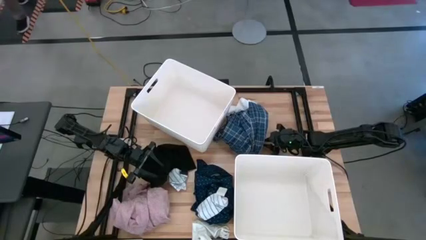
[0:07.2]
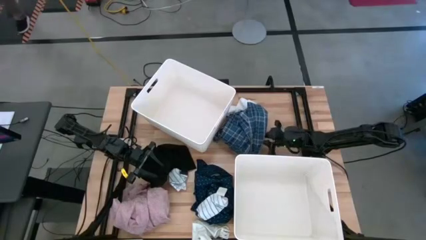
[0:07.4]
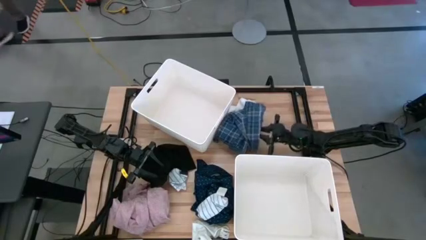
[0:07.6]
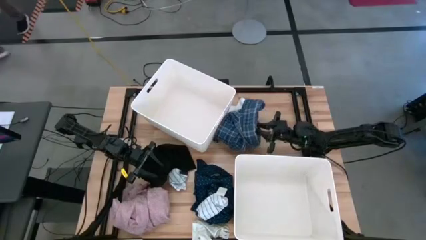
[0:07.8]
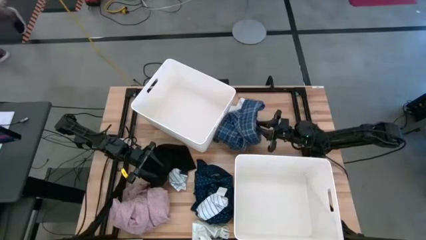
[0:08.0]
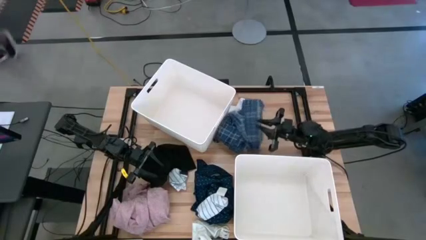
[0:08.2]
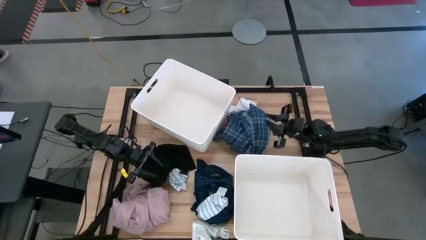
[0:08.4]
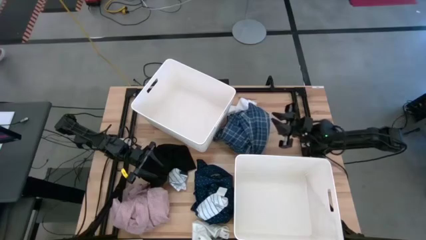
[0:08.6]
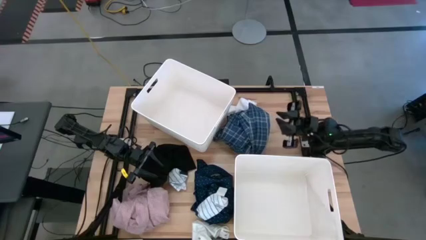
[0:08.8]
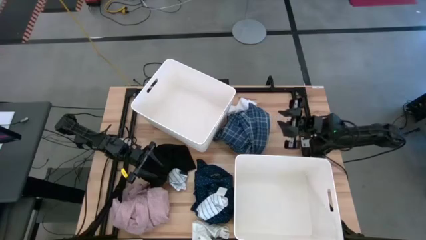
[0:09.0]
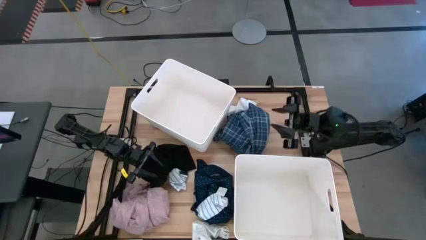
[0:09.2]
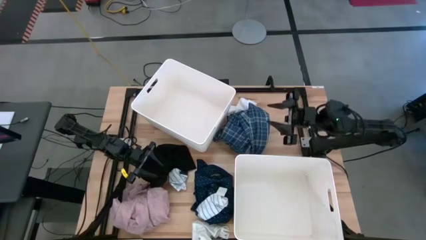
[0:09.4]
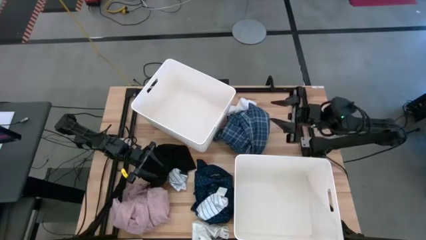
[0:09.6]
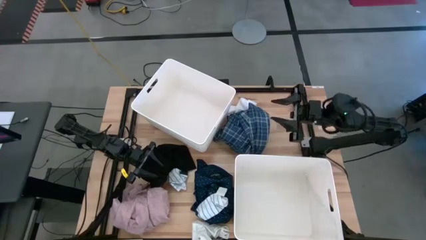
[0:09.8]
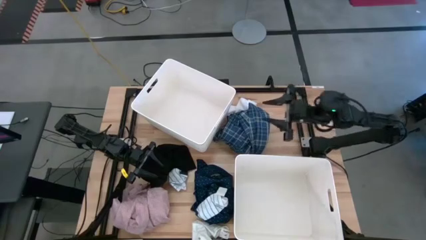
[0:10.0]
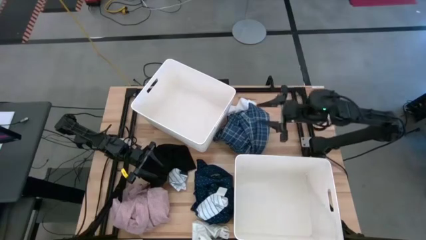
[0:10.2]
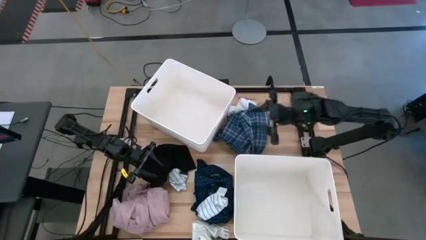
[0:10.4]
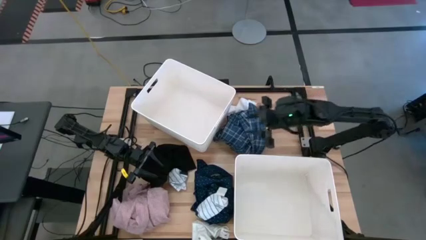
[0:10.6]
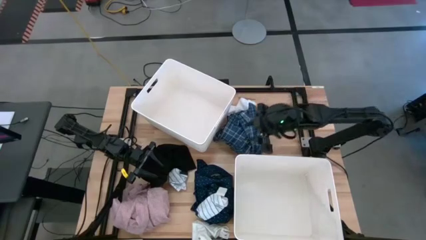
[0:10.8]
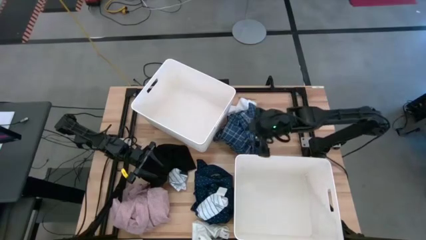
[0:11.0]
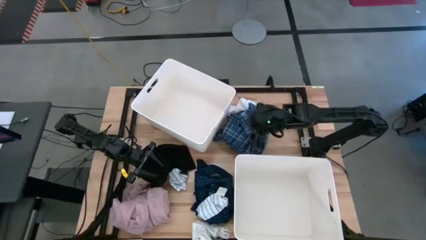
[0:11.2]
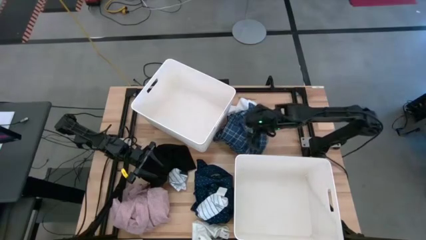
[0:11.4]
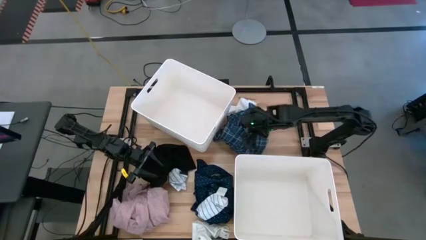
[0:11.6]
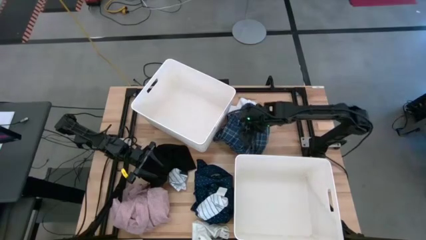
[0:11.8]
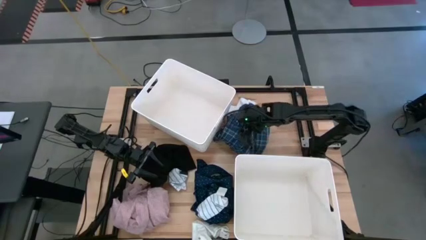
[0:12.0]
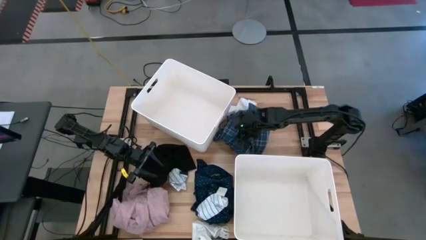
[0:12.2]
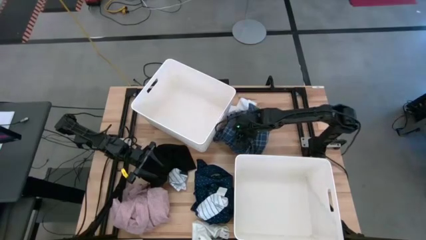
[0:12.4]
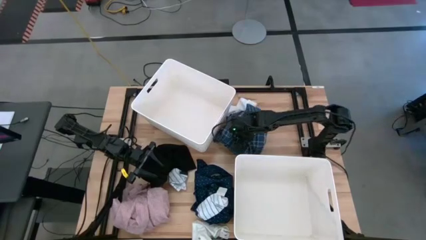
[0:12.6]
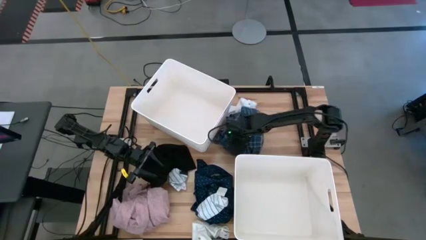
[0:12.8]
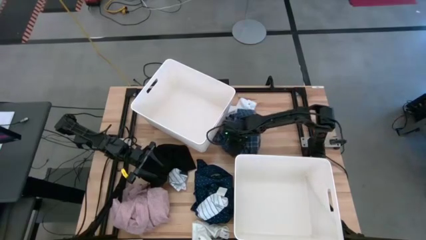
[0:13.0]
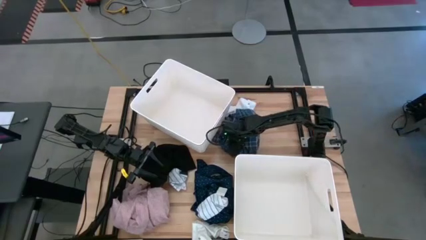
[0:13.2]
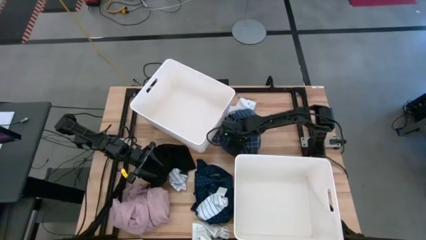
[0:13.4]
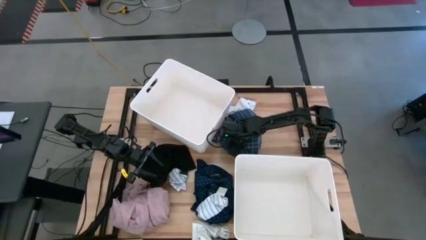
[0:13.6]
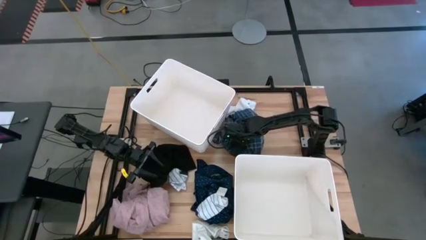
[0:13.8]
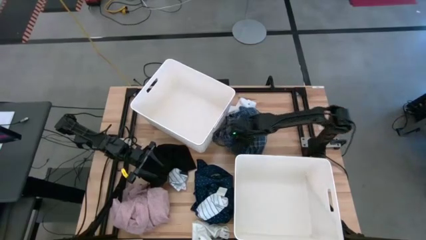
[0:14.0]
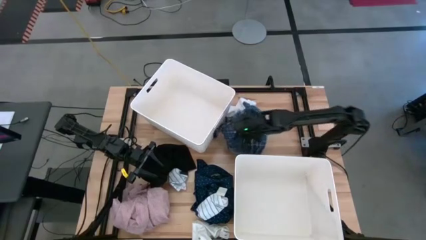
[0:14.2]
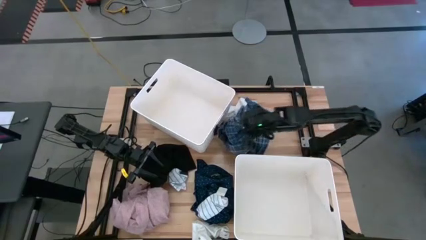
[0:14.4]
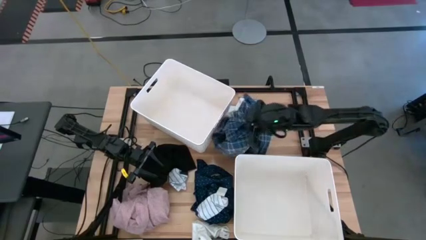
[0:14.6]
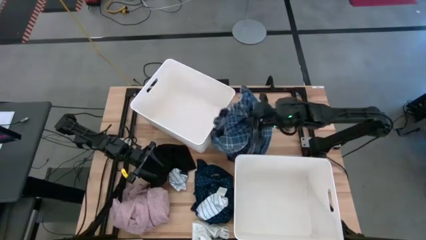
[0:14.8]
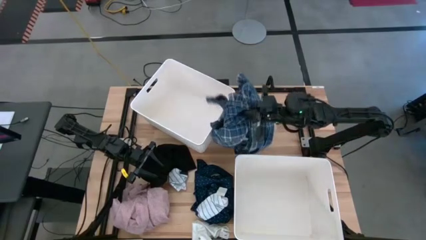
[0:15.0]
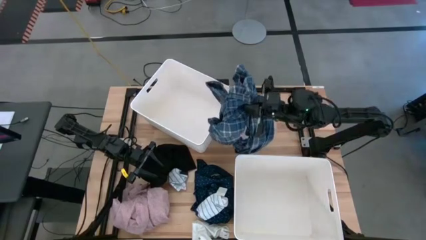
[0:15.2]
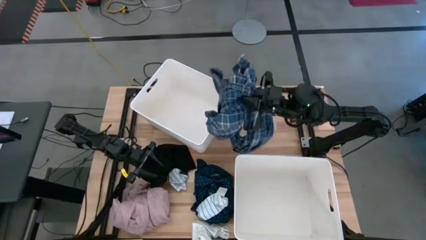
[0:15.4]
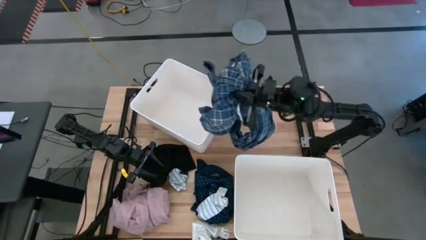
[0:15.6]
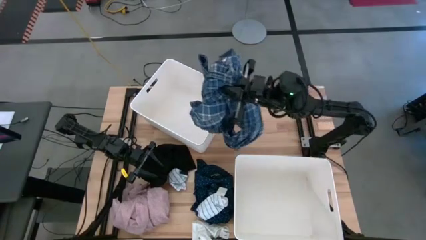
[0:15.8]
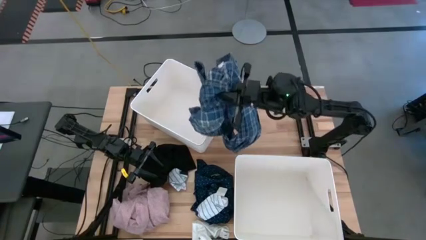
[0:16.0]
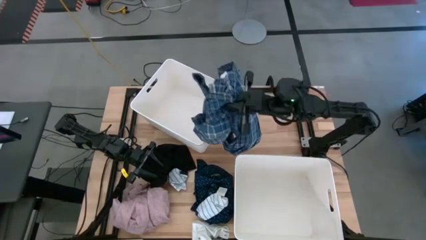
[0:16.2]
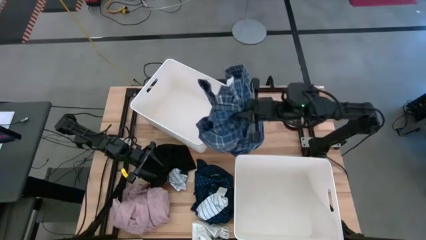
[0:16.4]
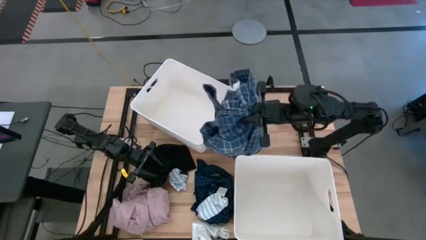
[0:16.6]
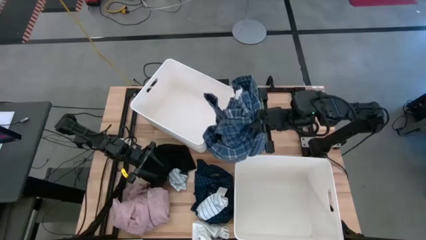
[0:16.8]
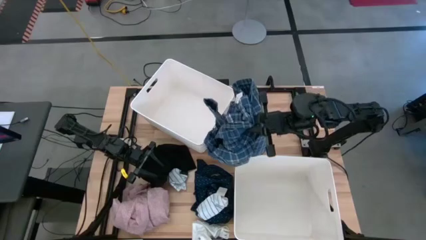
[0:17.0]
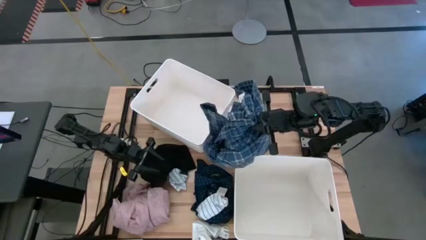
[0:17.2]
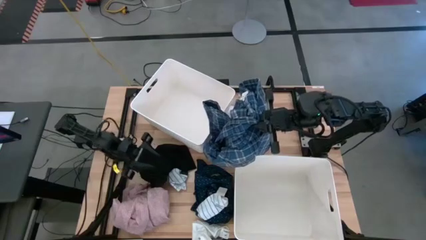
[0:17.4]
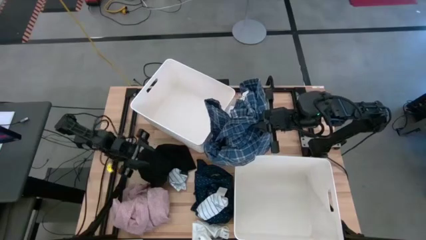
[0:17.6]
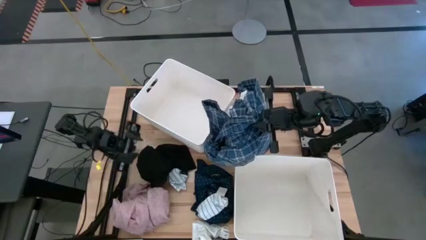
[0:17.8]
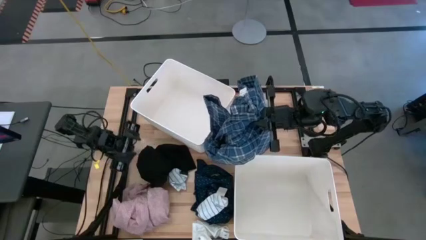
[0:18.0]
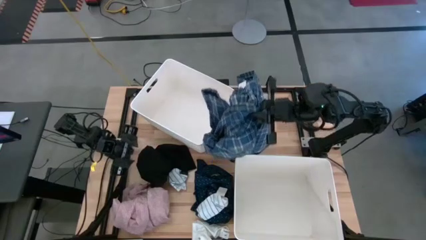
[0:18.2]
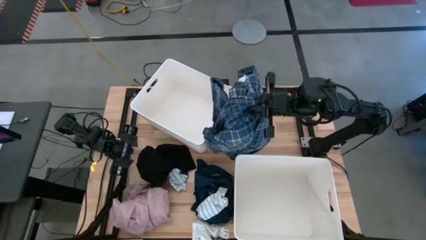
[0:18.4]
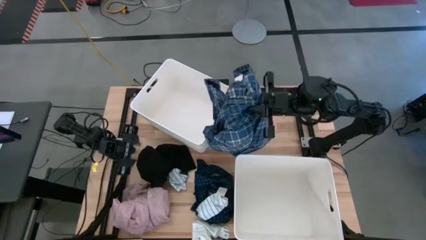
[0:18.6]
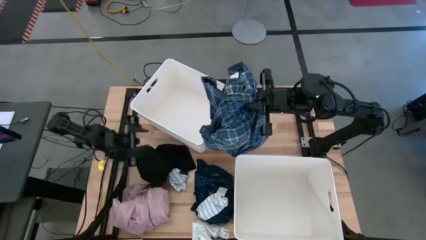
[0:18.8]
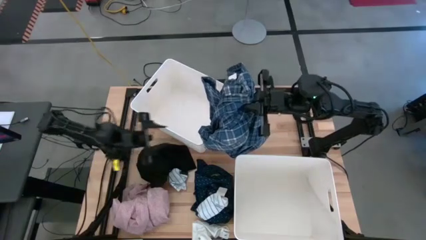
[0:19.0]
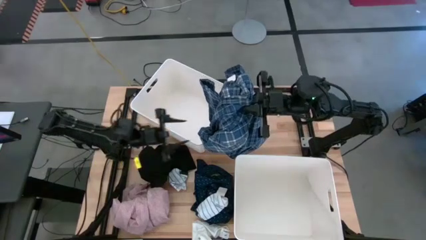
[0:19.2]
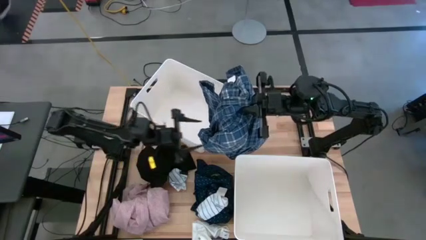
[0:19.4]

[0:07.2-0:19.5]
Task: Sort clothes
Put the top blue checkered polo shirt into the top white laundry bin

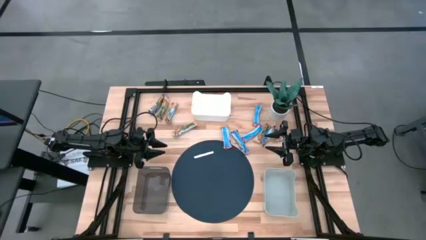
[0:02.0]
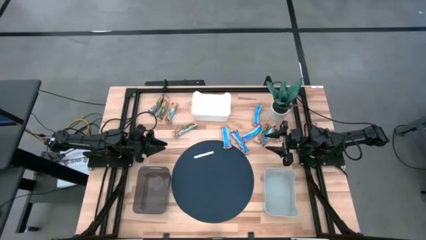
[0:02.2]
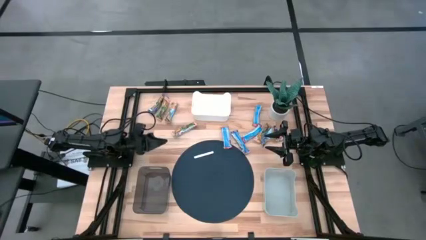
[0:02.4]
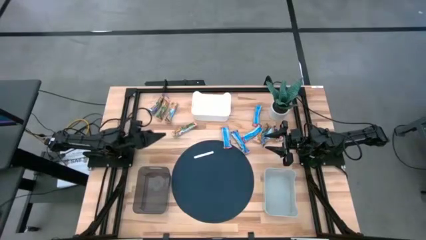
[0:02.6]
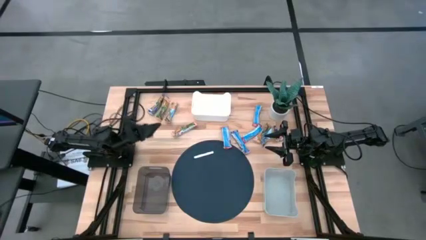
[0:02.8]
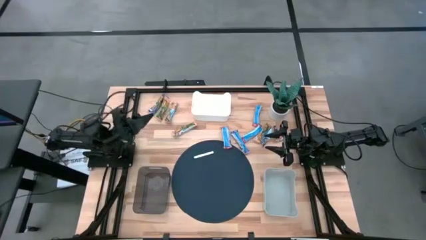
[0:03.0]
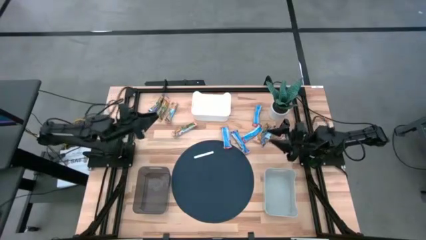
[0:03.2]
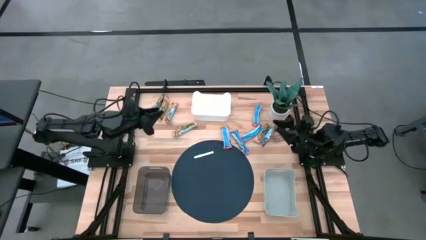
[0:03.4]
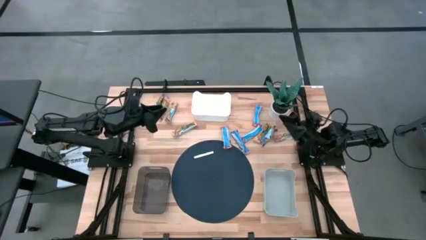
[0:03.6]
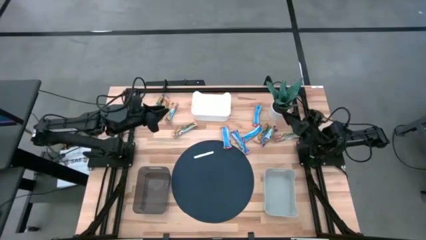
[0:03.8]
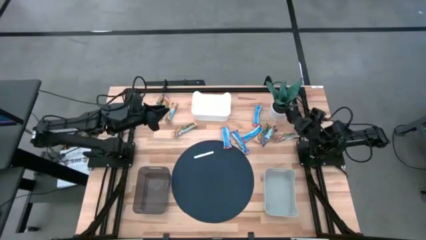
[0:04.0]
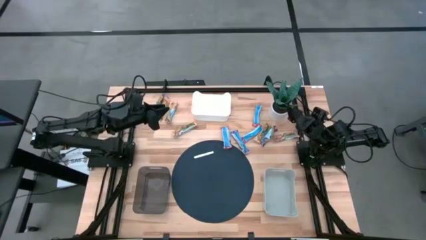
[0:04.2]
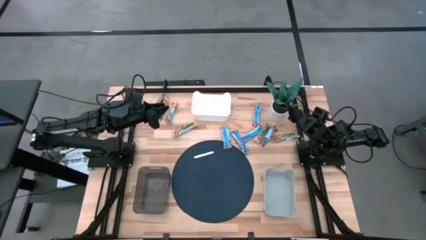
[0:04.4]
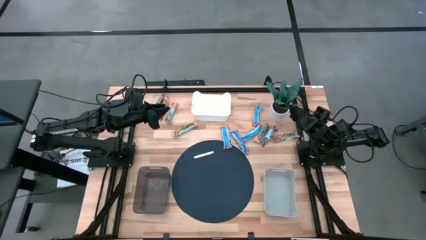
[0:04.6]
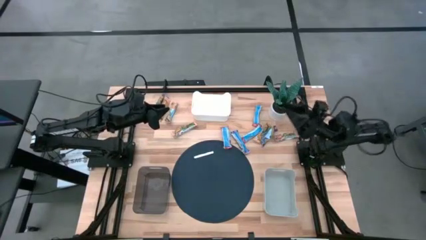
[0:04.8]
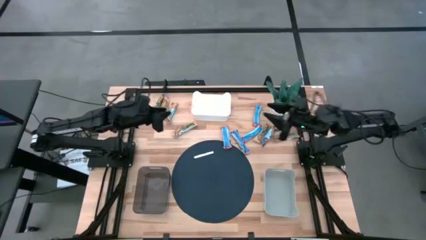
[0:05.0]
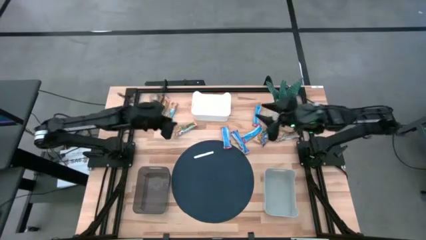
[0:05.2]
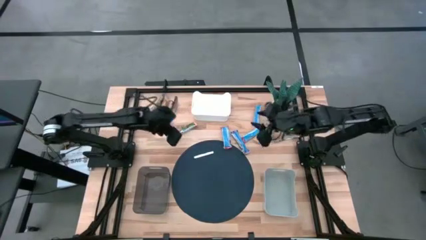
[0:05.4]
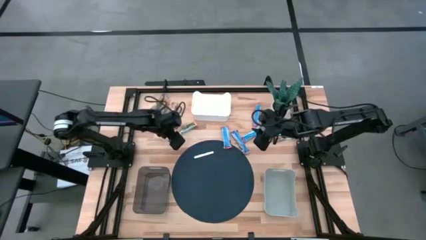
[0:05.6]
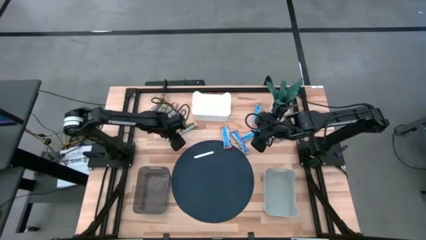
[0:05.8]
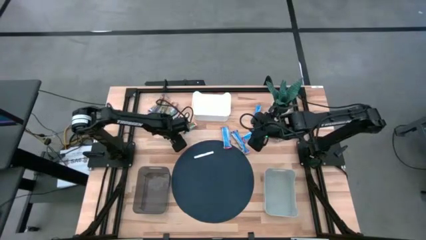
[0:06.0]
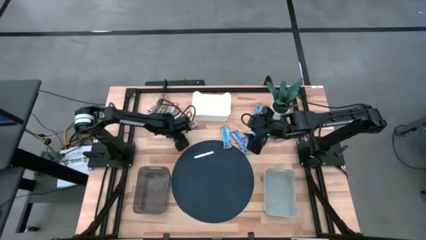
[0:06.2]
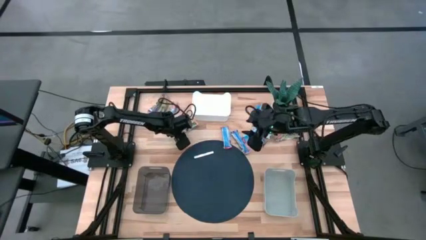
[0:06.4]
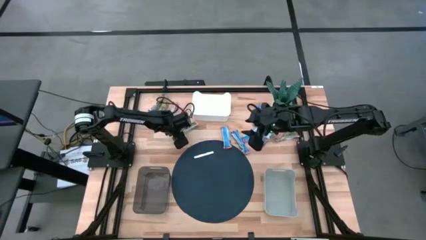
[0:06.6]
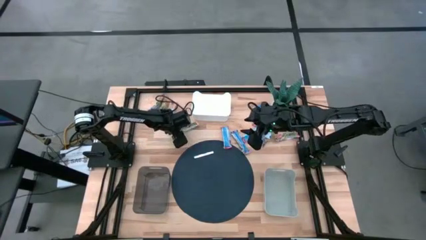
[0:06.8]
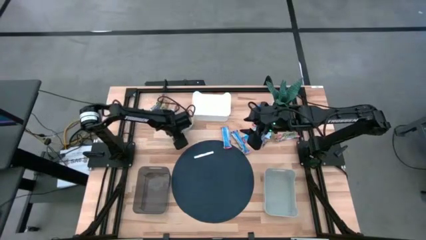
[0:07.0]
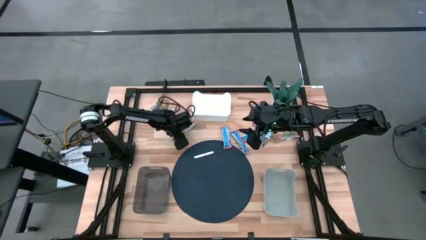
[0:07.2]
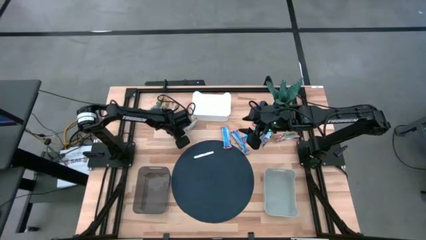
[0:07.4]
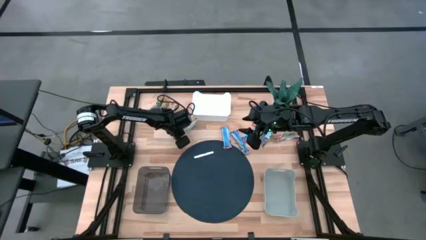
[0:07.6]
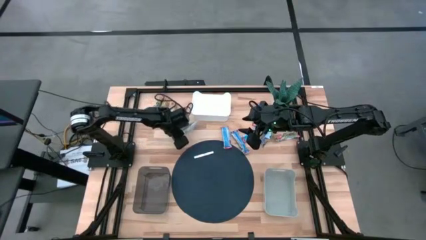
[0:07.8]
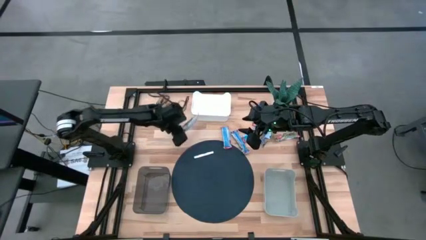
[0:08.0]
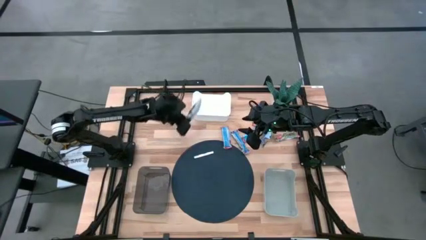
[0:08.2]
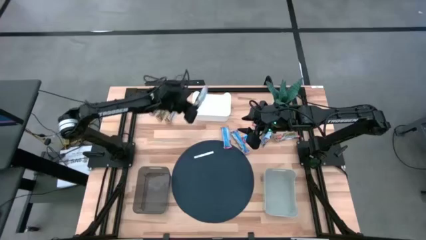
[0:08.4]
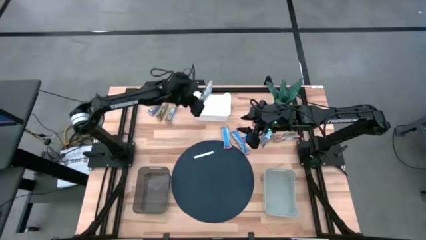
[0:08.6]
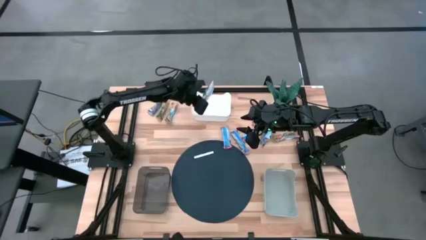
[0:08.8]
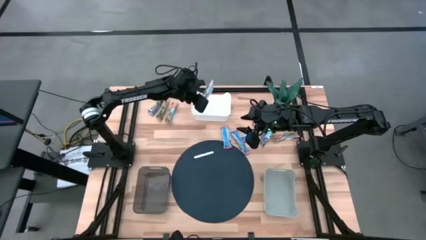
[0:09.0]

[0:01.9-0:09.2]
Task: Pick and place Granola Bars by type
Put the yellow granola bar into the white bin
